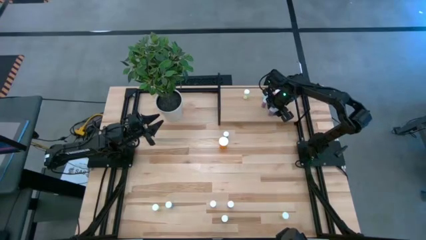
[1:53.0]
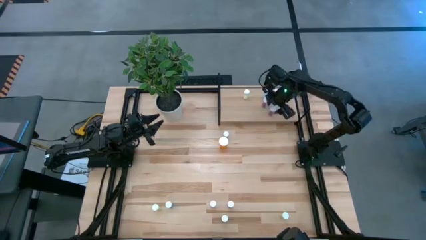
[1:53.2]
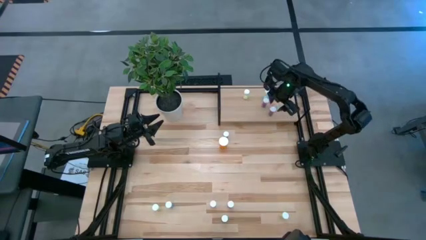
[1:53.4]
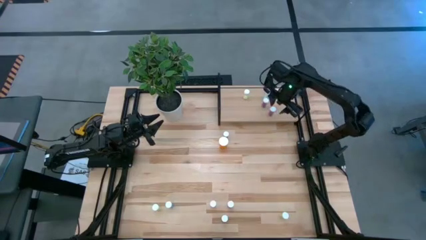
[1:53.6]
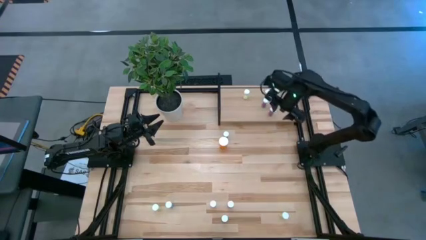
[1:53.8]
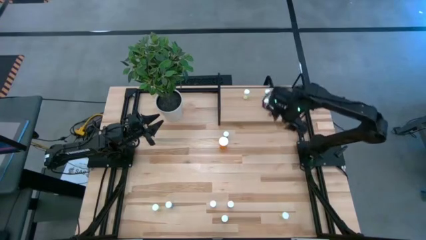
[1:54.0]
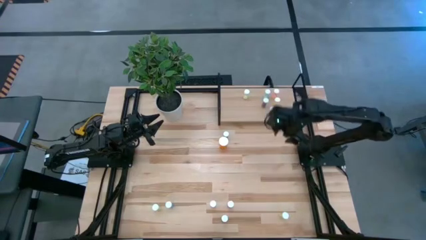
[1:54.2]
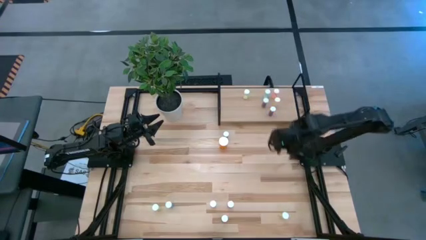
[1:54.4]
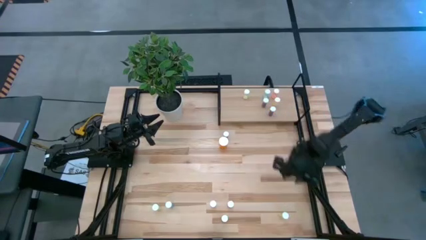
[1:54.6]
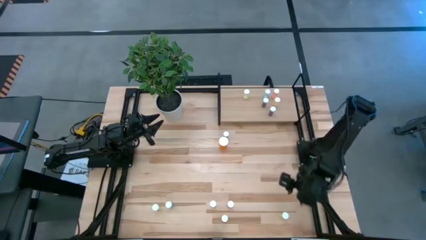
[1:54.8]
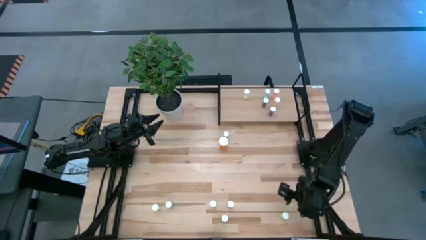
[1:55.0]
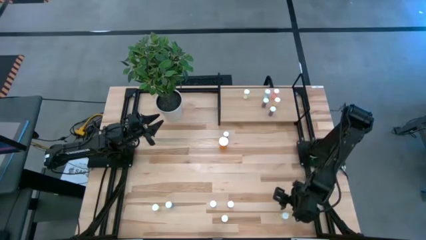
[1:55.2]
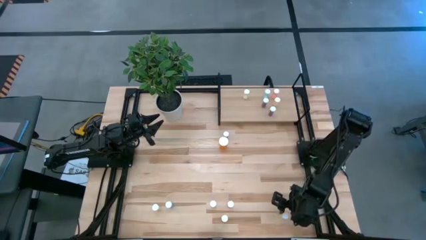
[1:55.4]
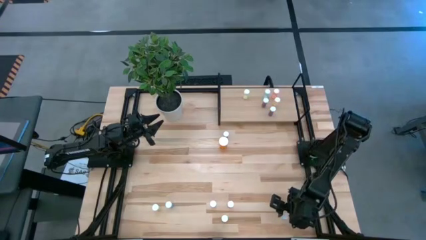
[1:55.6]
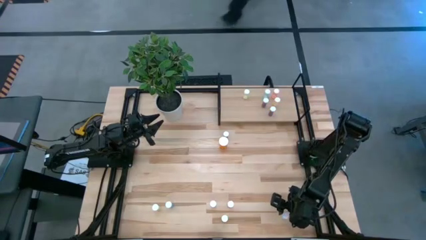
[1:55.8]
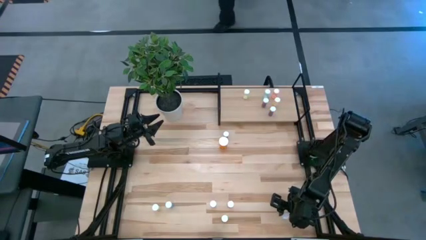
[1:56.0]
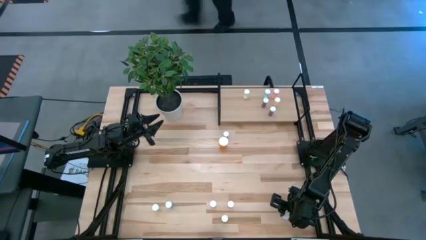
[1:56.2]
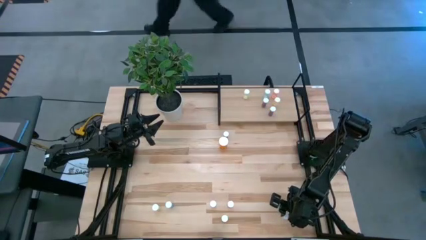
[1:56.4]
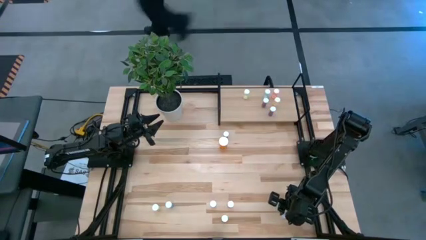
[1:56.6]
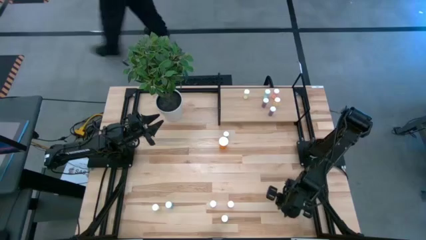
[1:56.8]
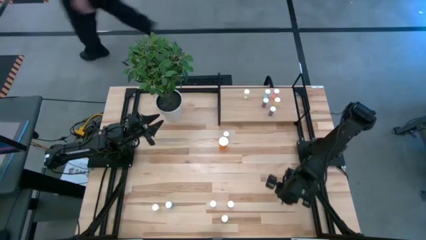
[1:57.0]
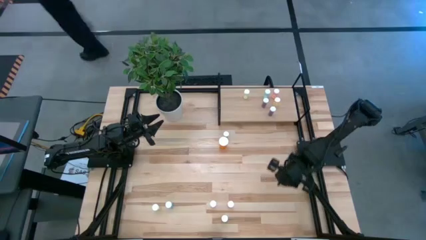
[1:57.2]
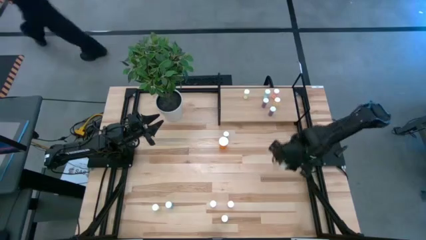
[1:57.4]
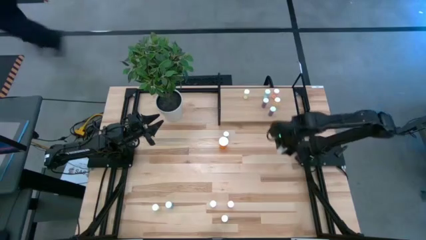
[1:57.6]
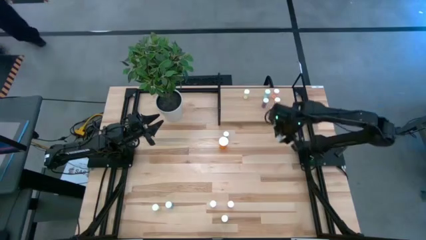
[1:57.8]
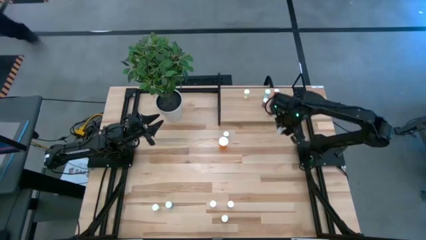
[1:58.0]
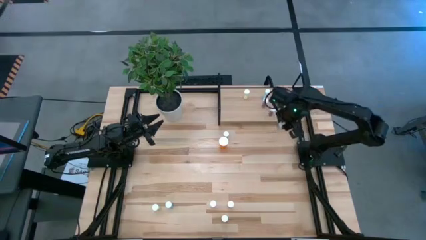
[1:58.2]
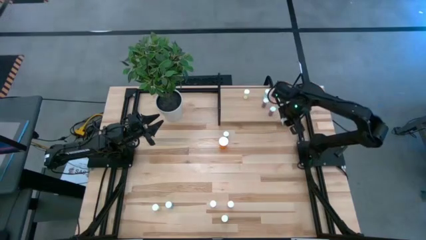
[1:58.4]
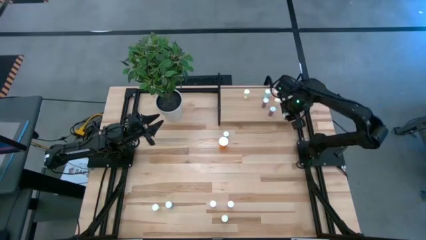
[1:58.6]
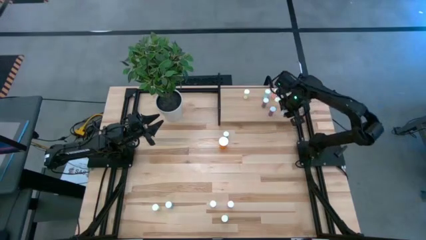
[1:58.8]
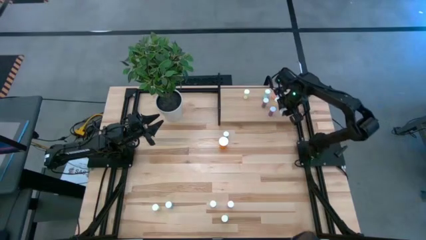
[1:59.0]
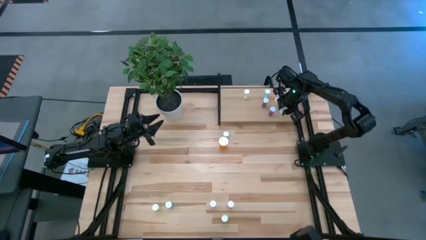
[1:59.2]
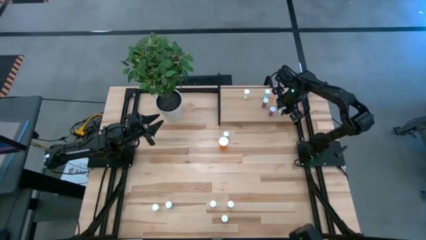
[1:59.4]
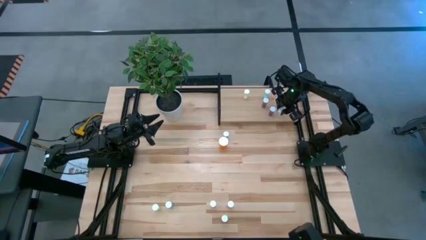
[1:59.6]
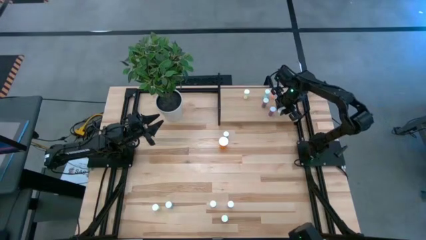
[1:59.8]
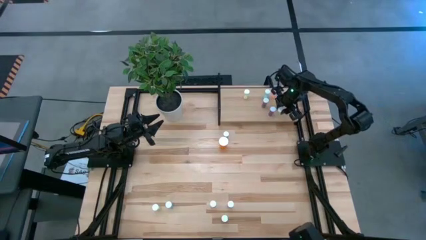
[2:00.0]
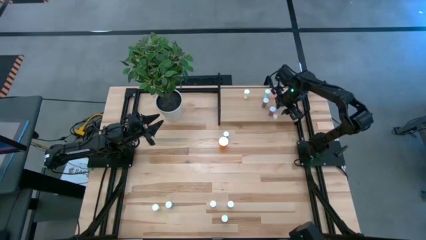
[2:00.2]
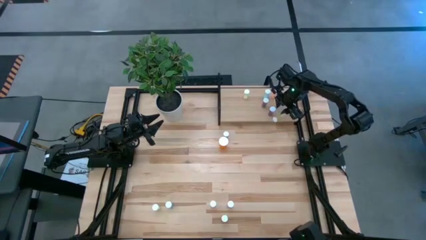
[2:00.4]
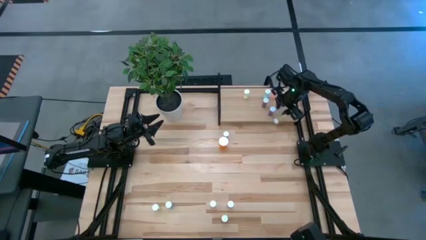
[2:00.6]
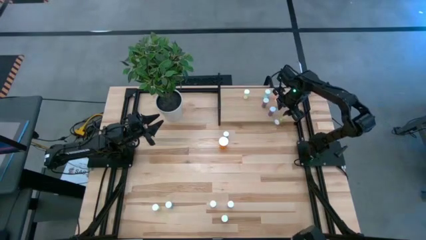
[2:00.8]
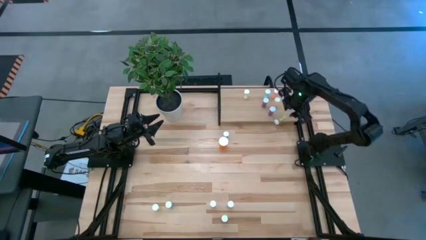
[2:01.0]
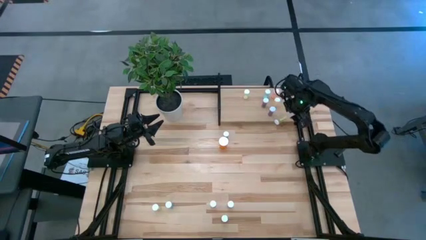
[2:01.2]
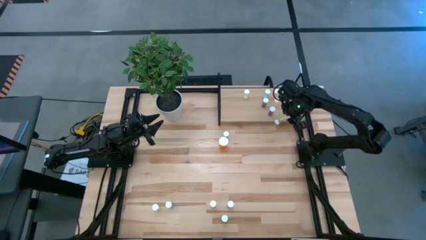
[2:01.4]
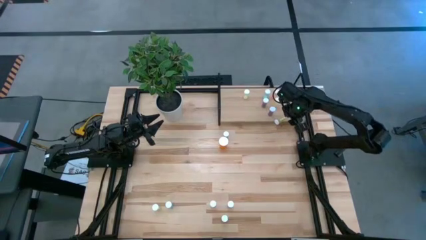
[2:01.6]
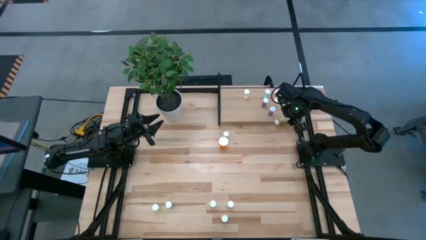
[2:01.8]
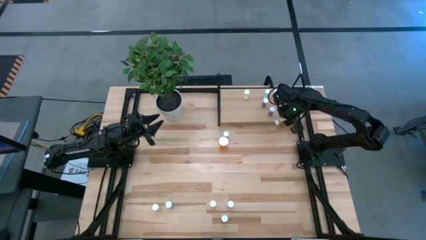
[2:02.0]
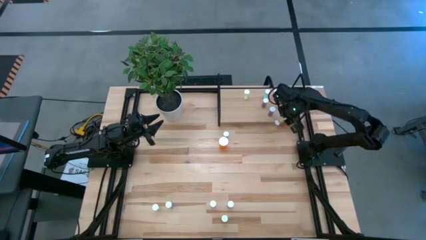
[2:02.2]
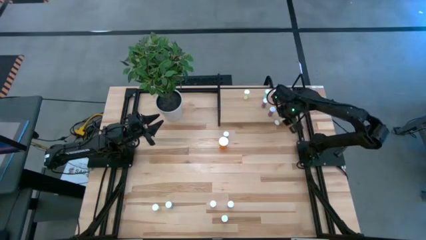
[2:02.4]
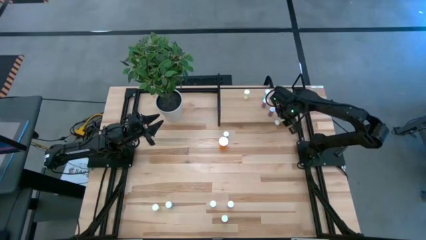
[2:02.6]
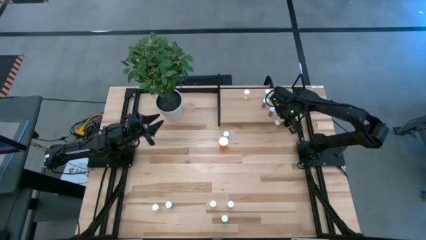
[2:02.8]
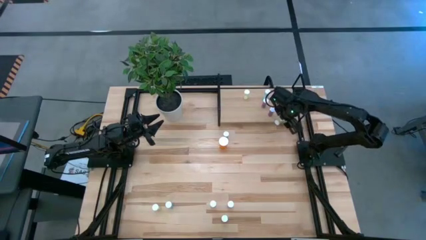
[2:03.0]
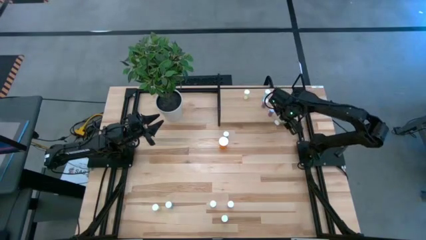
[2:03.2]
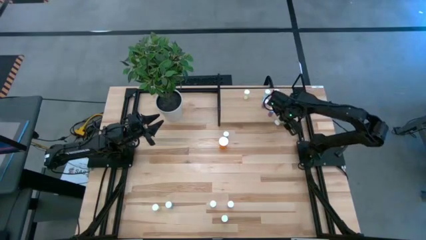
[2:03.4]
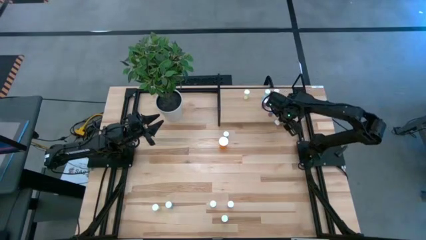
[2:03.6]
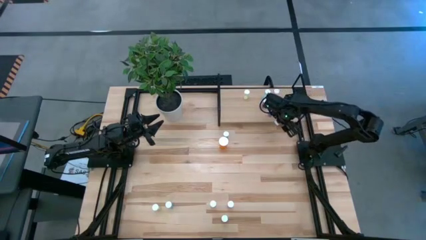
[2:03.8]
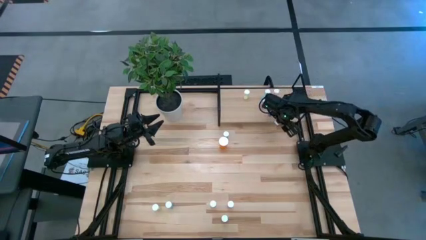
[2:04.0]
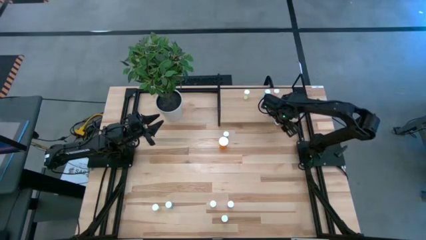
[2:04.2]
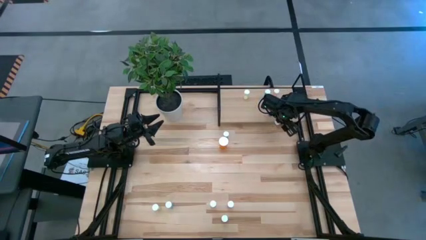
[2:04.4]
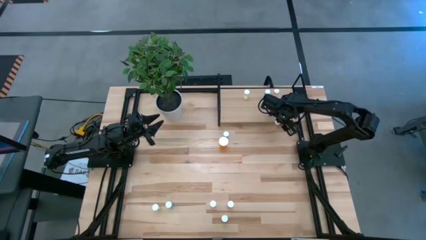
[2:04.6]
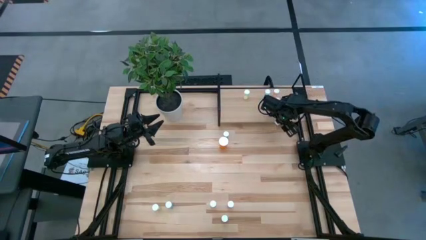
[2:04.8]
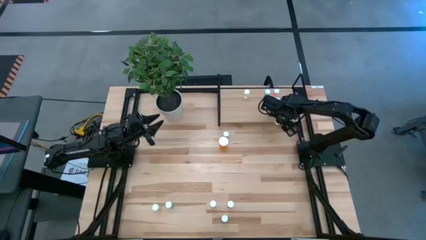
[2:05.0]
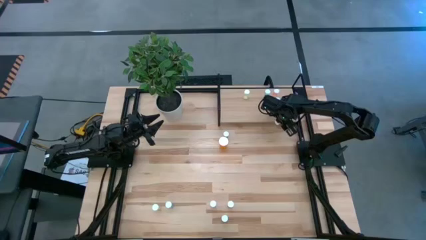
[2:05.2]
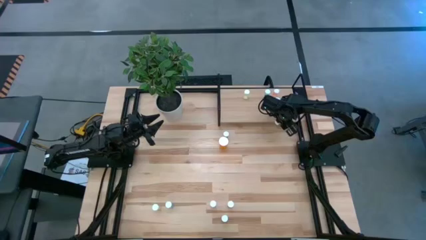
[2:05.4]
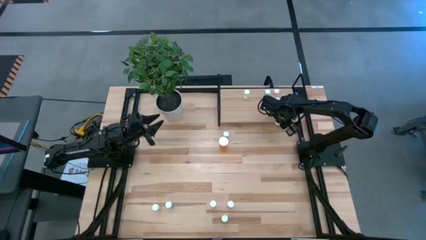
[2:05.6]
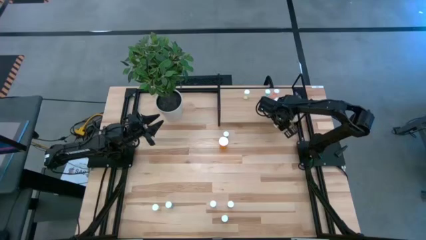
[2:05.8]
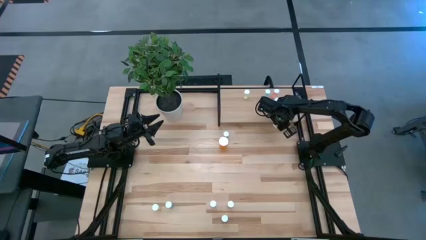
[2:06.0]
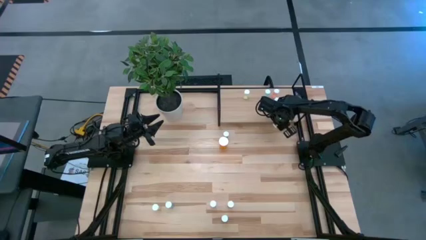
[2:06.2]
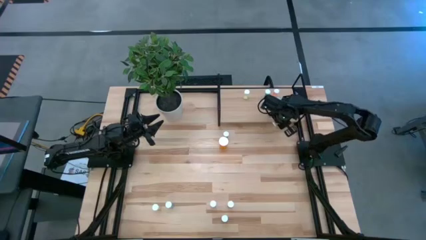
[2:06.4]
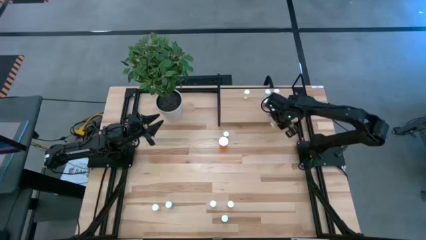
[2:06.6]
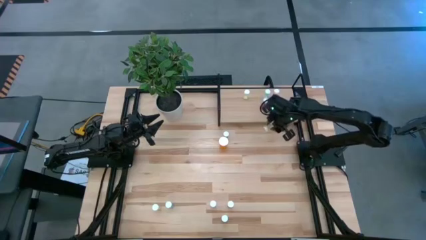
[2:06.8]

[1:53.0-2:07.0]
Task: Pick and place medicine bottles onto shelf by color
Put the right yellow pill bottle on the shelf

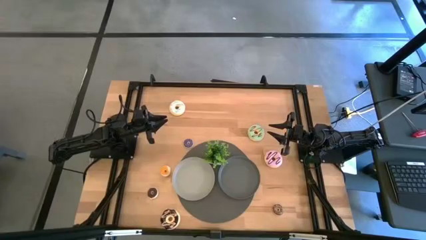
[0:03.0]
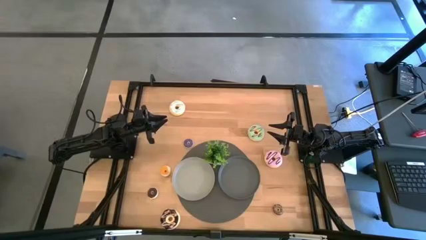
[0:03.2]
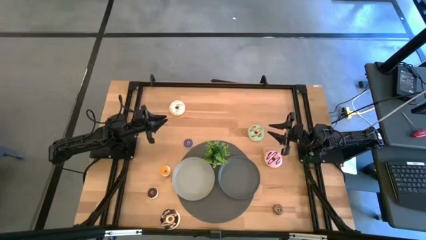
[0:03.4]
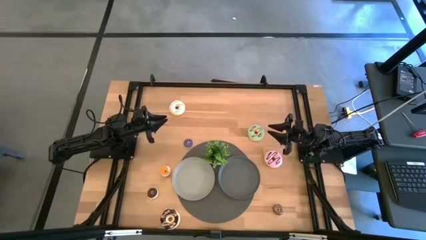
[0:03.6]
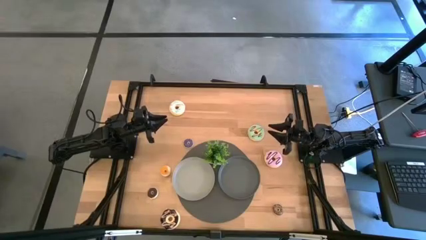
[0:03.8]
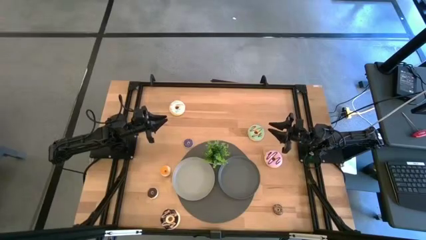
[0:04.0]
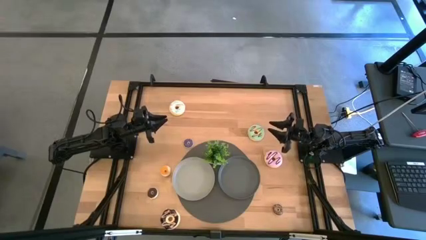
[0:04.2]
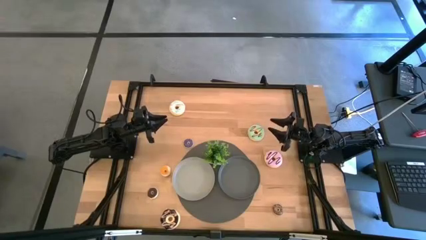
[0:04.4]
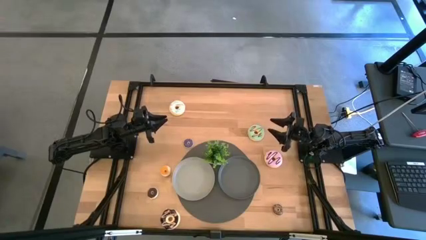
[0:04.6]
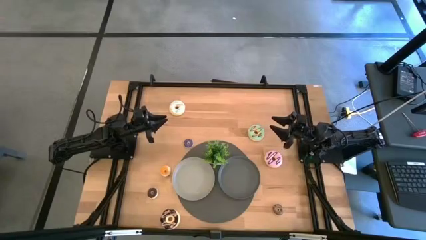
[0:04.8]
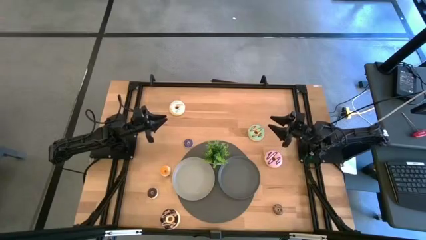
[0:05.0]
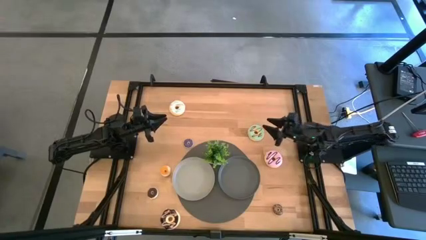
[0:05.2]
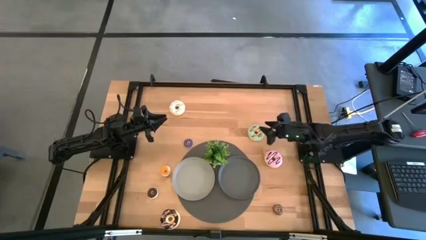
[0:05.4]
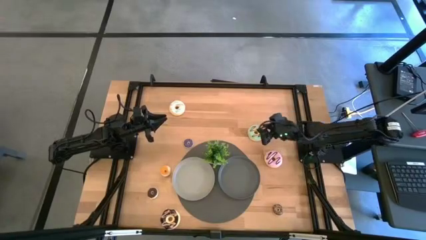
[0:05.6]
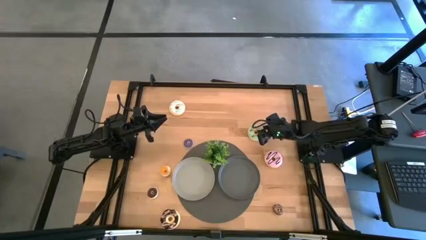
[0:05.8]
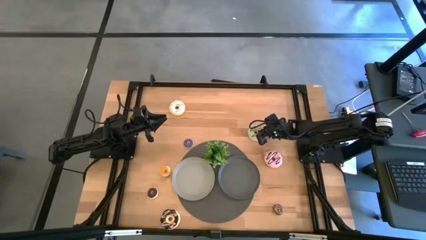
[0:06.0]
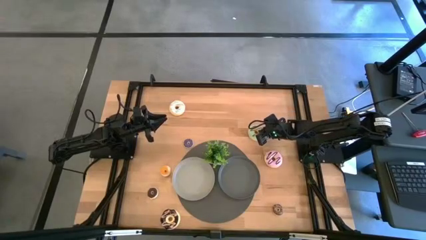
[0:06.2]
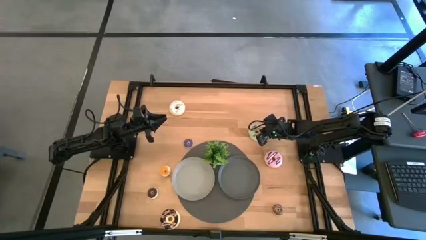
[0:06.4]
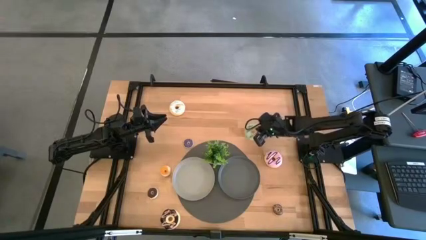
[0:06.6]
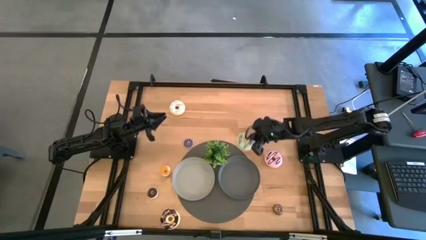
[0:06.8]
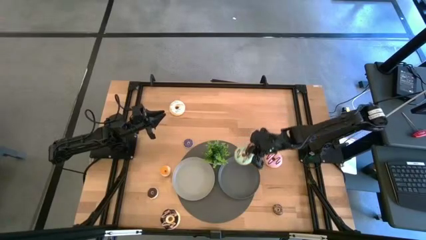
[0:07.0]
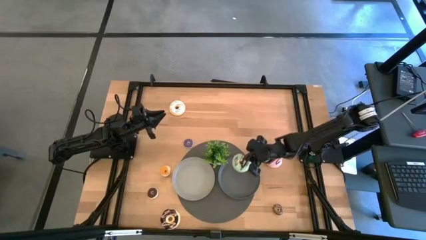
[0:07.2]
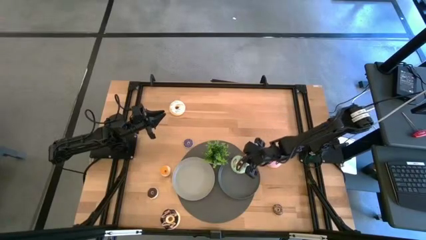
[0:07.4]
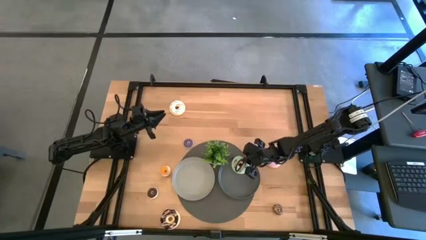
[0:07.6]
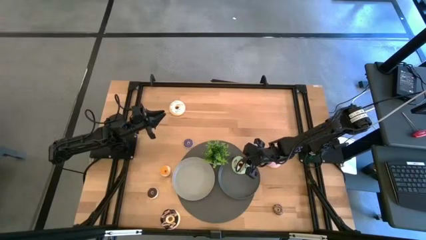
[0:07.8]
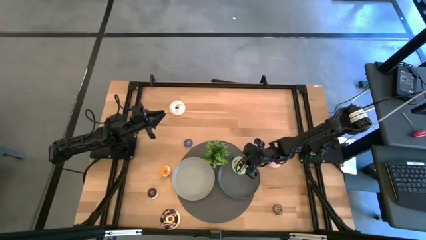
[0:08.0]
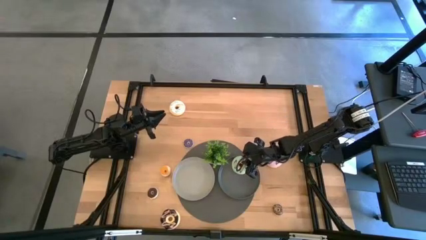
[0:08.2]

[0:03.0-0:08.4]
Task: Pick & Place donuts
Put the large blue donut on the black plate
